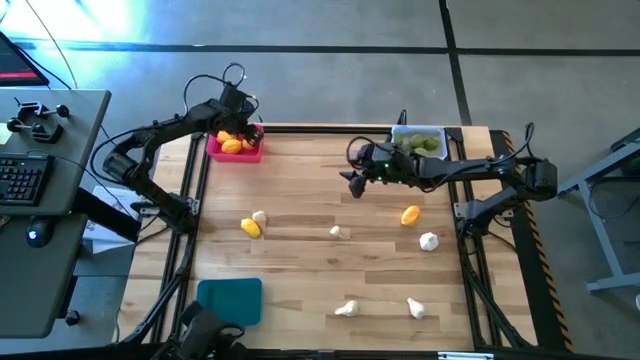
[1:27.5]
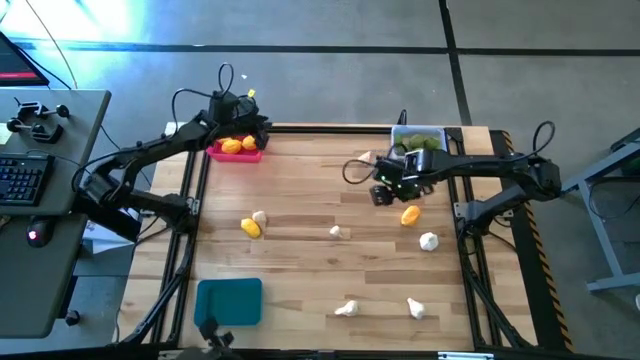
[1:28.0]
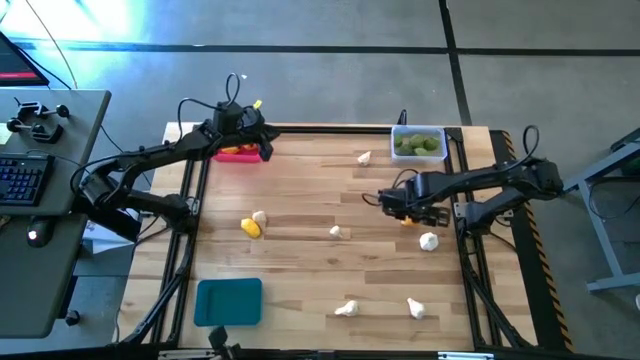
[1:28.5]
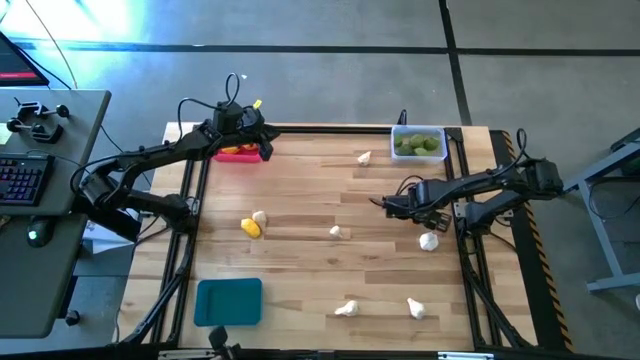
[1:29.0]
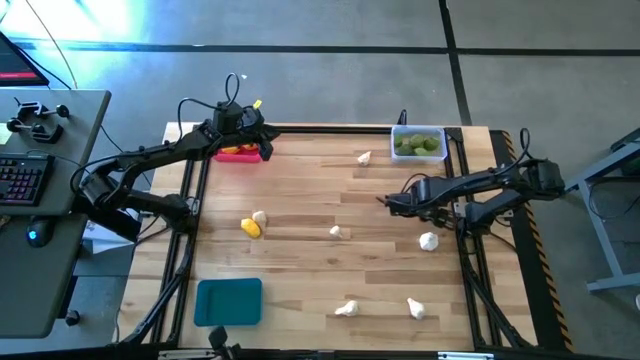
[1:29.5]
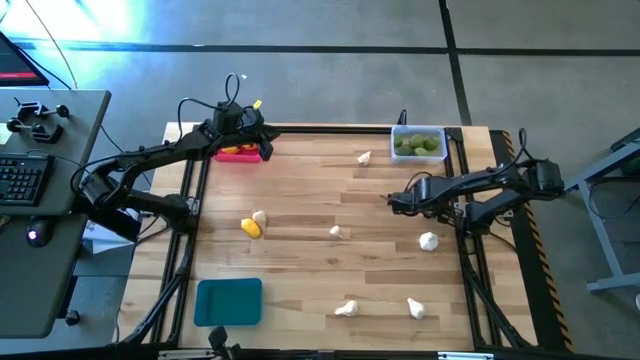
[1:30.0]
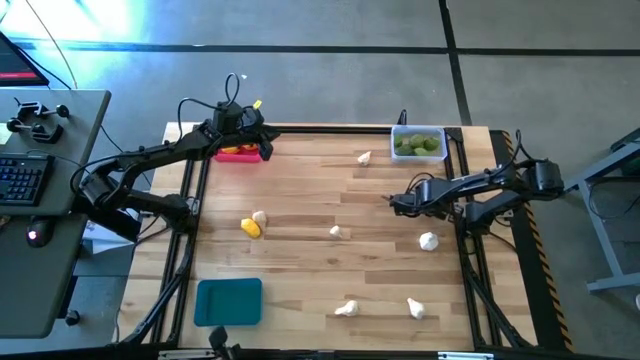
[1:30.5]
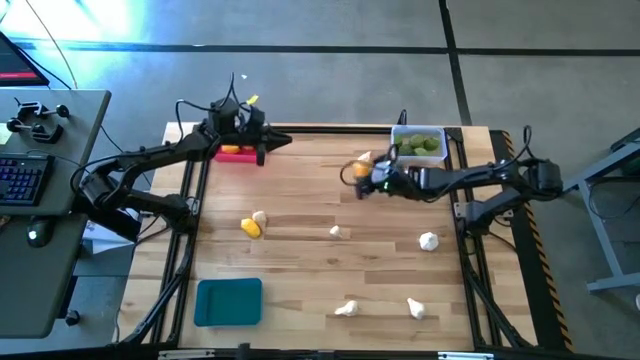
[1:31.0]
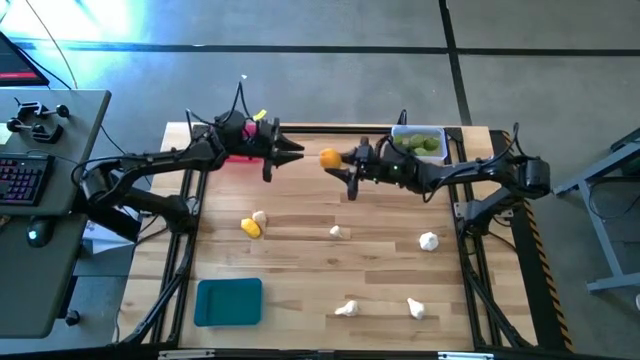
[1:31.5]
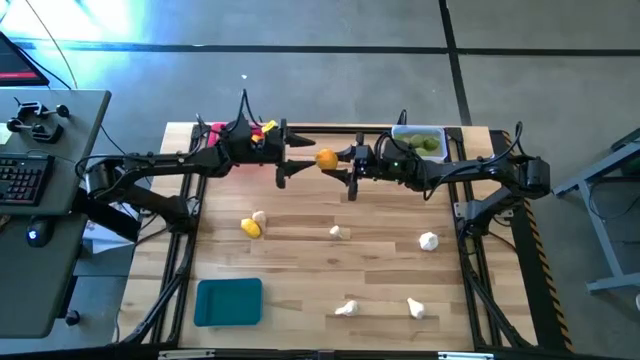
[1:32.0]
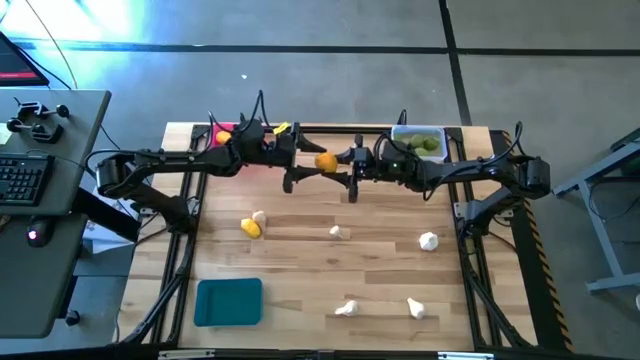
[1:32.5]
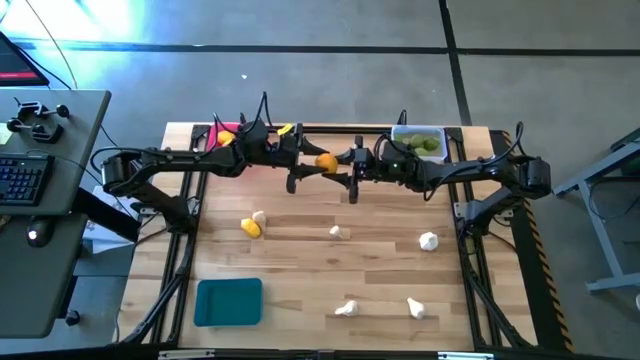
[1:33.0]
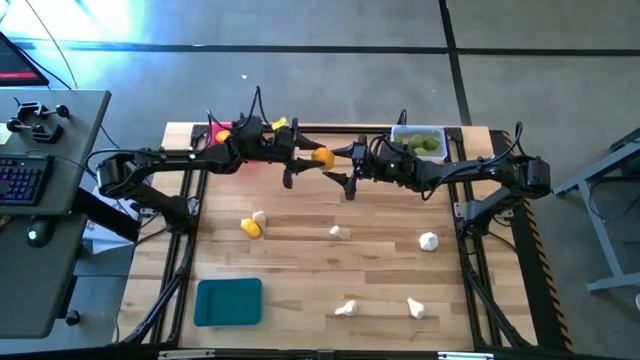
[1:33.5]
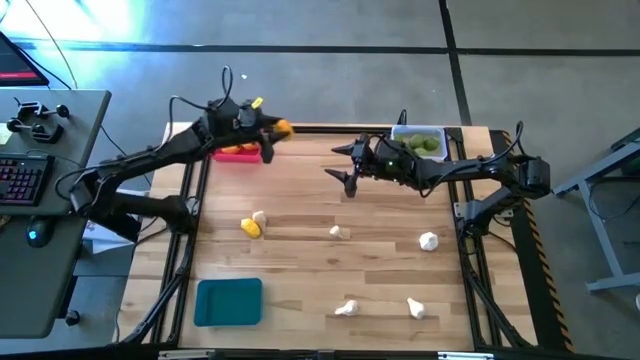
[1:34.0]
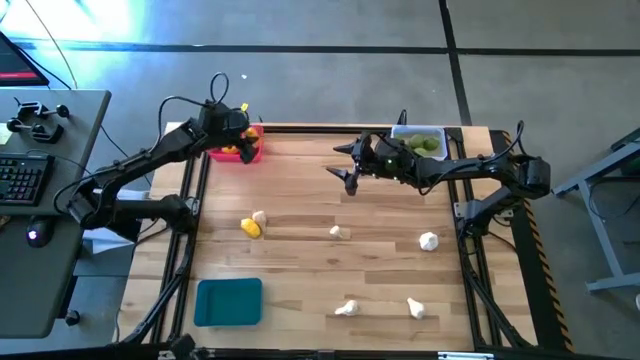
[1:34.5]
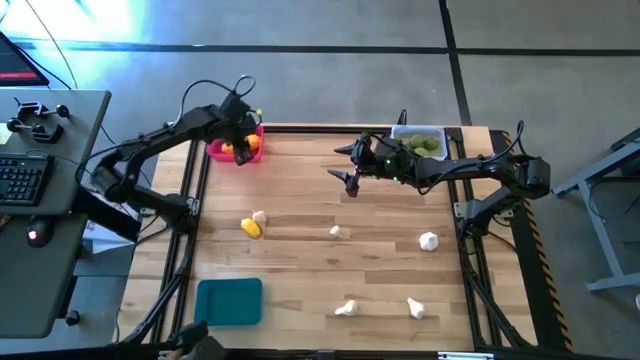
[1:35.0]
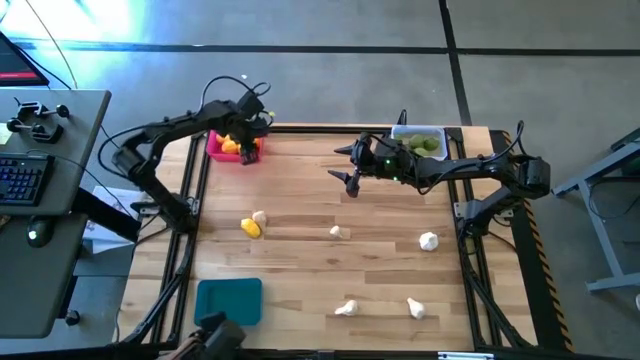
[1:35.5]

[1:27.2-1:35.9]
Task: Sort produce into baskets
Put the right lemon into the pink bin

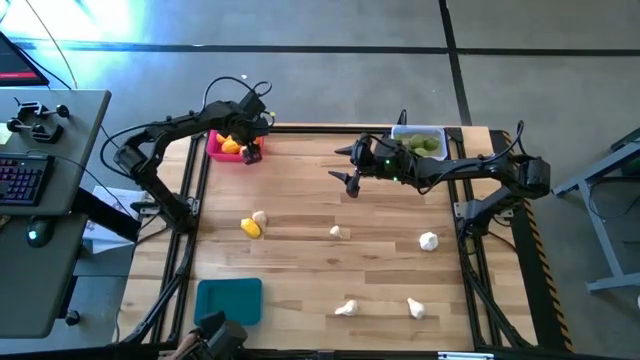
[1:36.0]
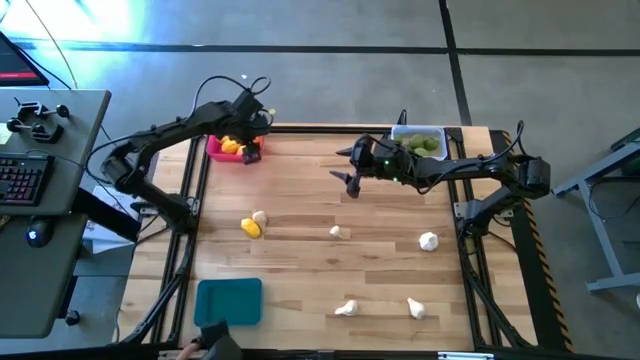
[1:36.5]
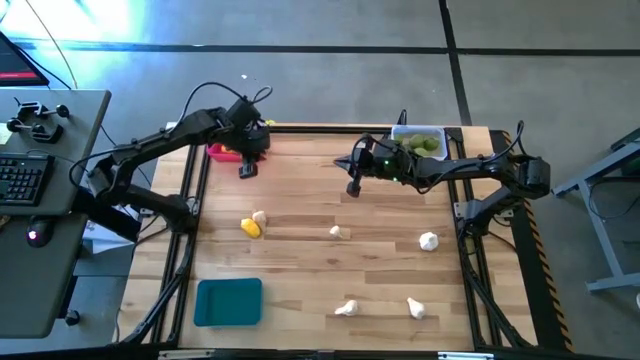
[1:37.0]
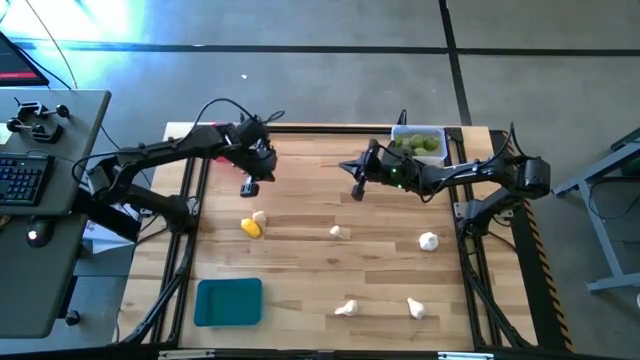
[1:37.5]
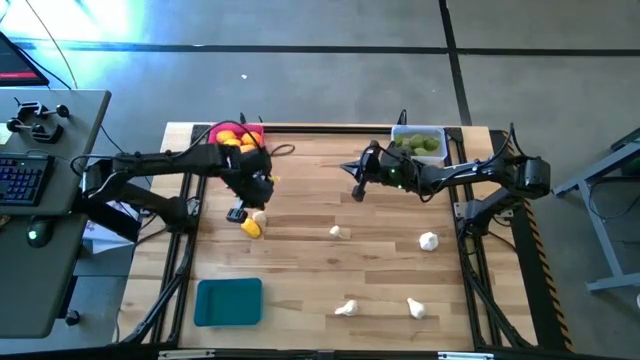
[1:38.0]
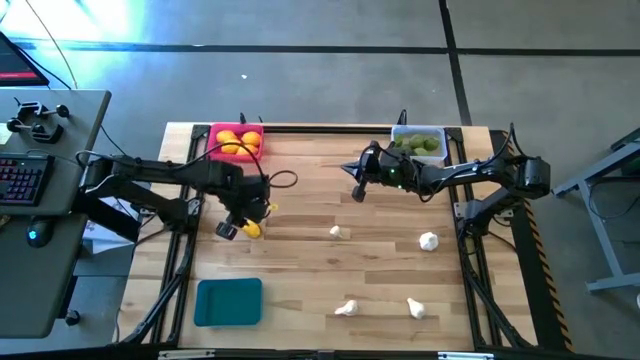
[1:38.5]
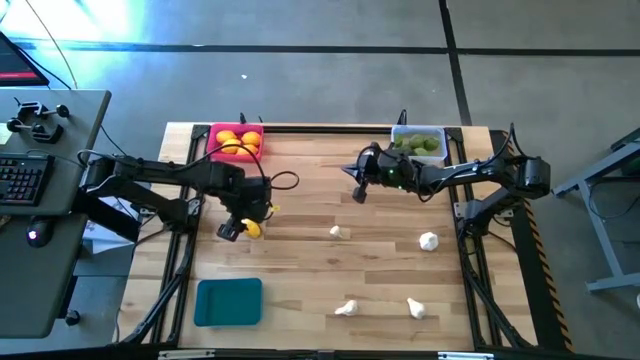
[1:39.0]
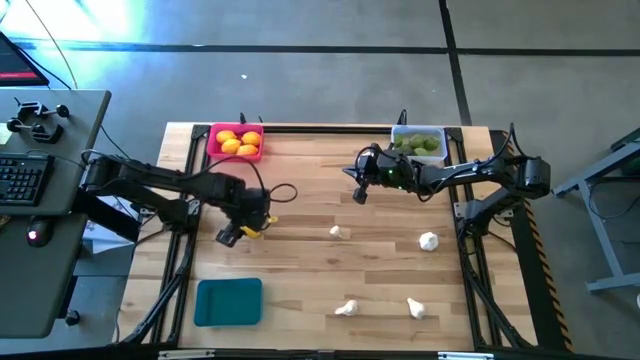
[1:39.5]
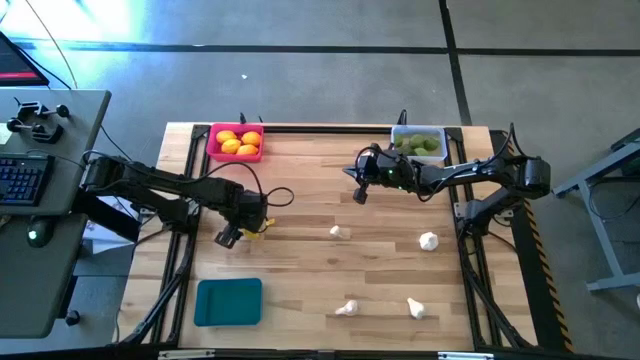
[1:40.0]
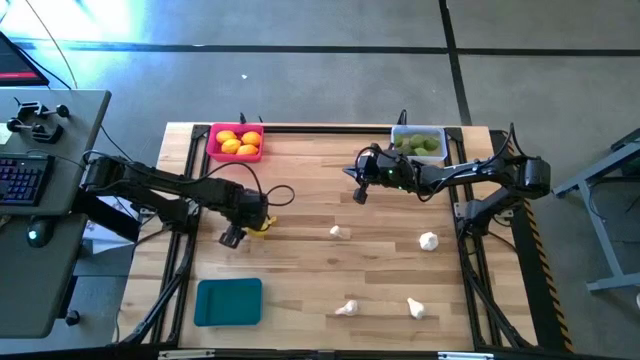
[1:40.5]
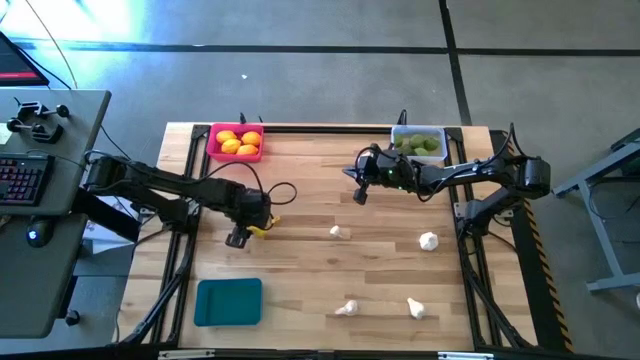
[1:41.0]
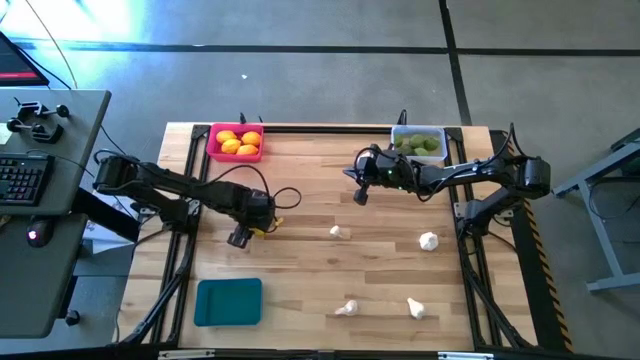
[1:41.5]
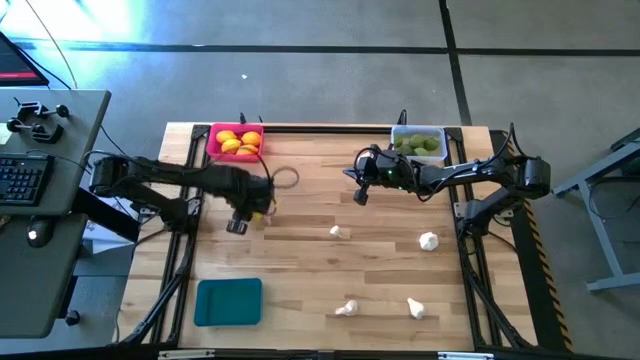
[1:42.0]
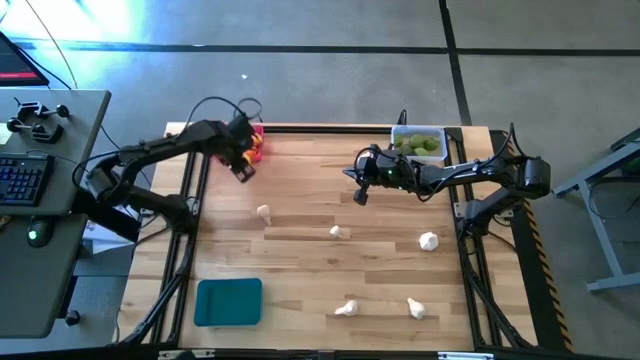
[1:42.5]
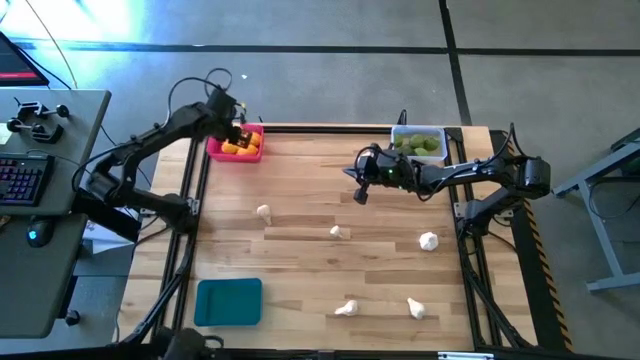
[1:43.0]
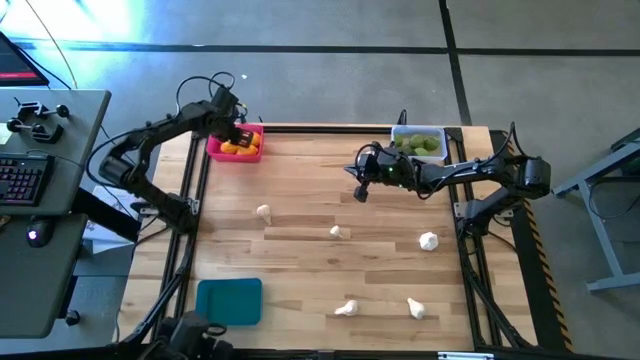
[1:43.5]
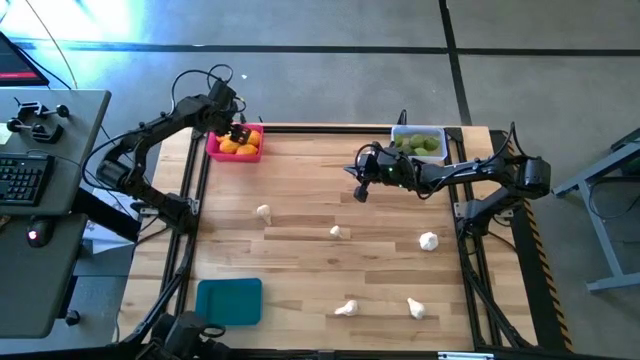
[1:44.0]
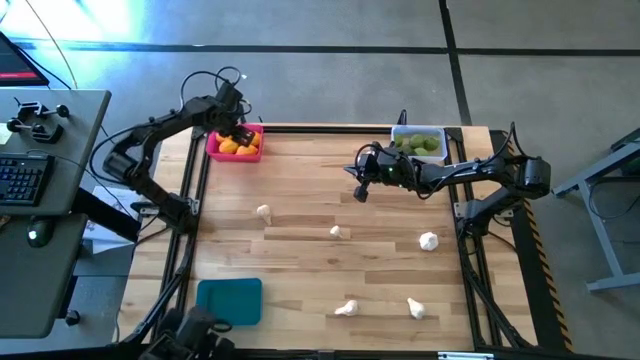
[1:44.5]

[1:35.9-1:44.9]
Put the lemon into the pink bin

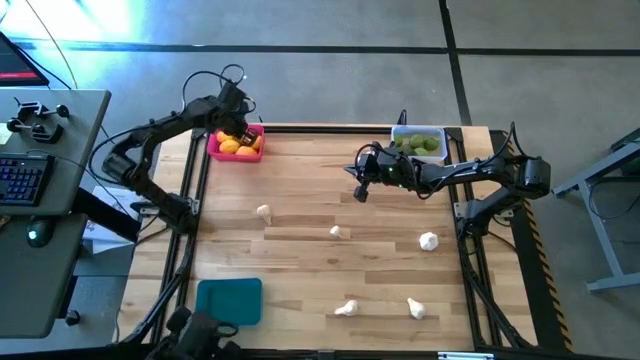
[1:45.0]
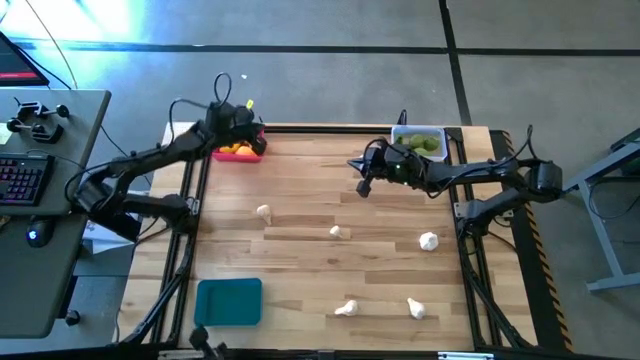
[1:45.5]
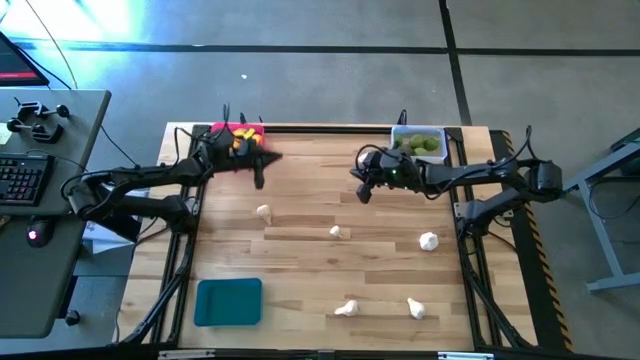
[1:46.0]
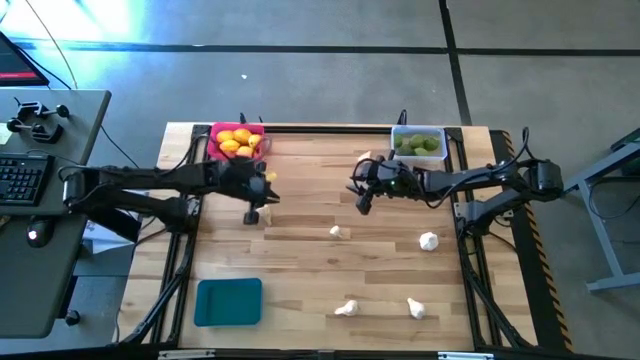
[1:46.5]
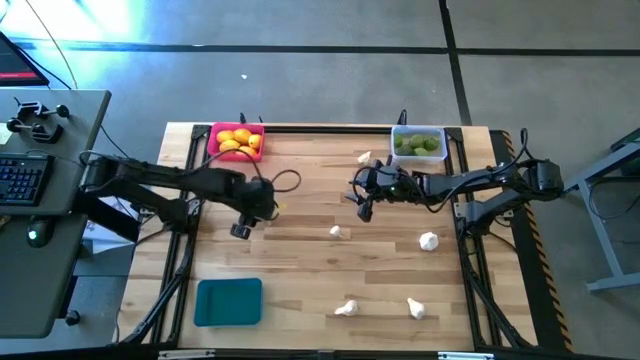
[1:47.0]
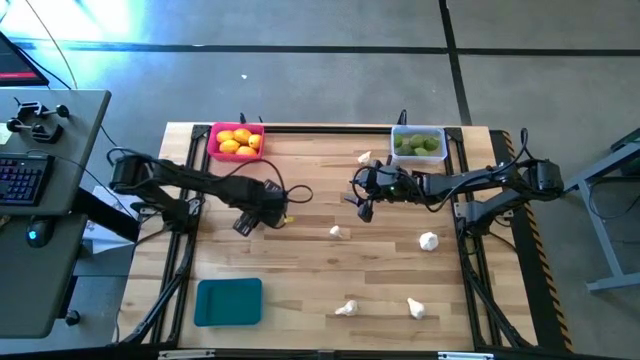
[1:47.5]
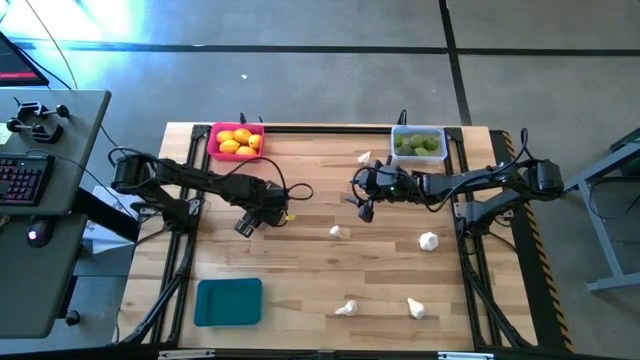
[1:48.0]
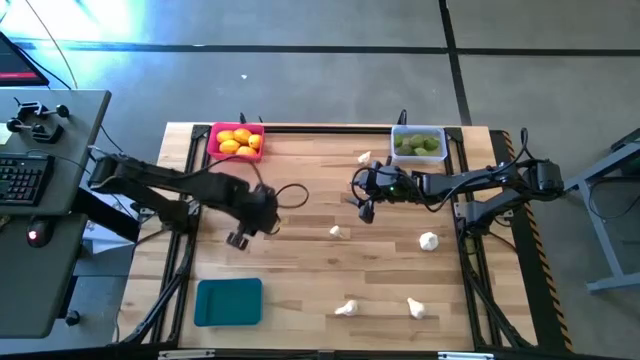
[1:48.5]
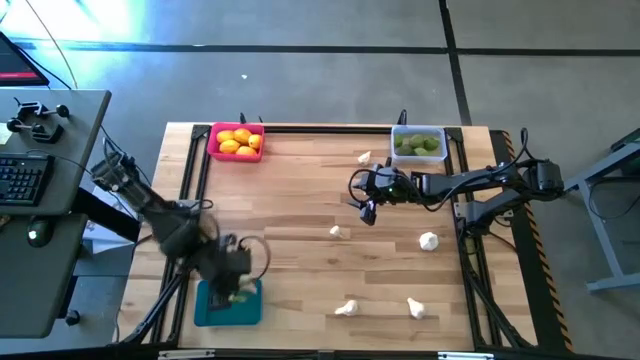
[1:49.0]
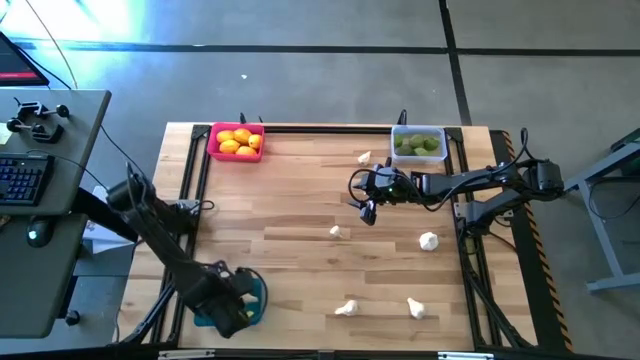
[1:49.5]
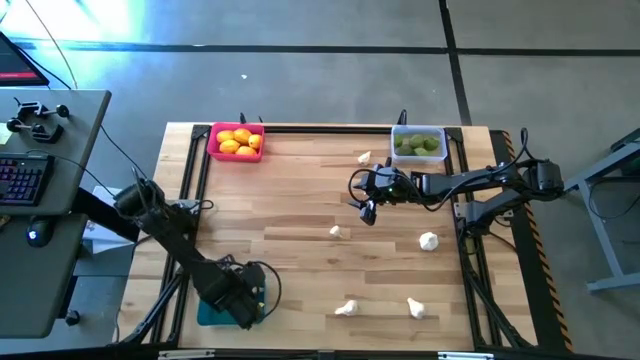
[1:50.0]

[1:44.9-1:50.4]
Put the middle left garlic into the blue bin
